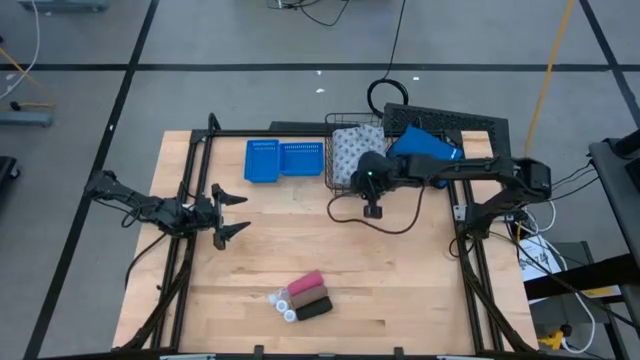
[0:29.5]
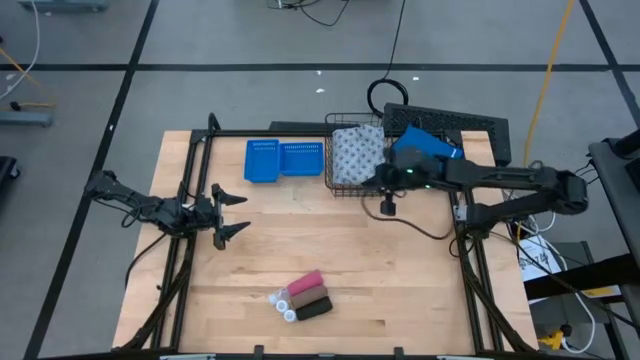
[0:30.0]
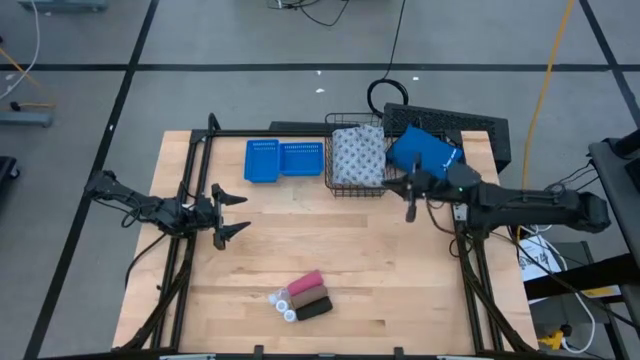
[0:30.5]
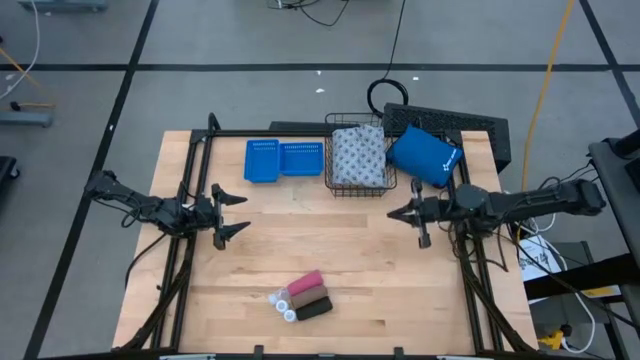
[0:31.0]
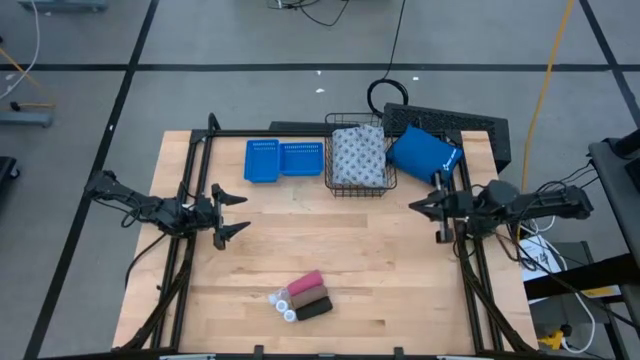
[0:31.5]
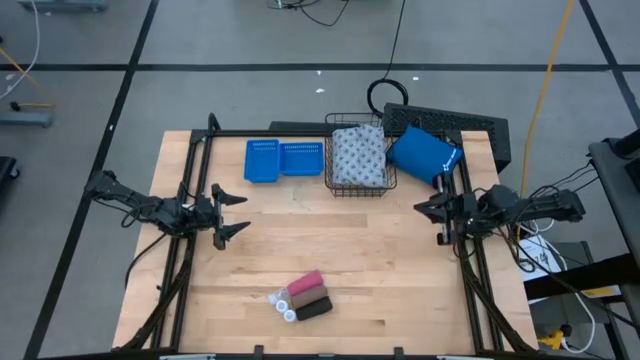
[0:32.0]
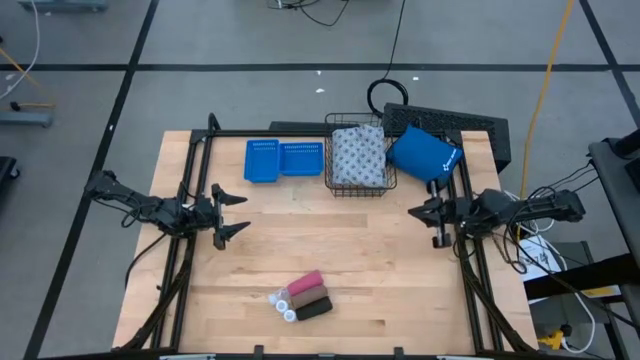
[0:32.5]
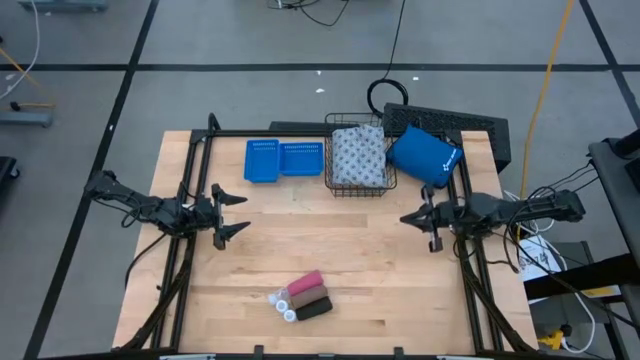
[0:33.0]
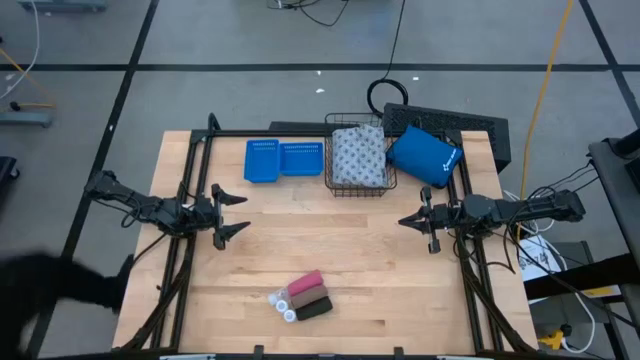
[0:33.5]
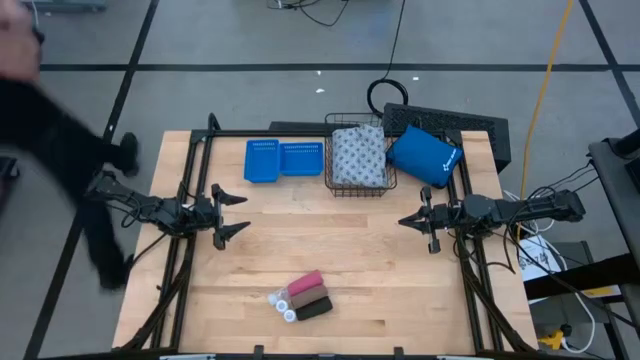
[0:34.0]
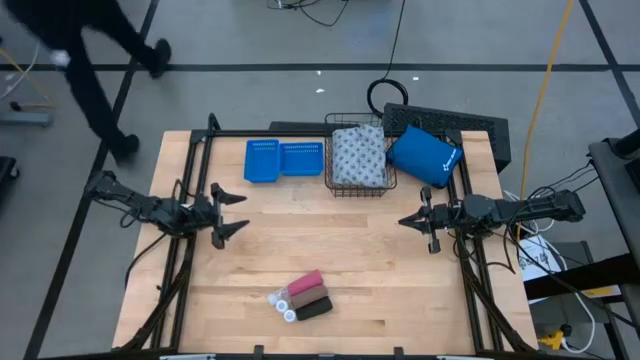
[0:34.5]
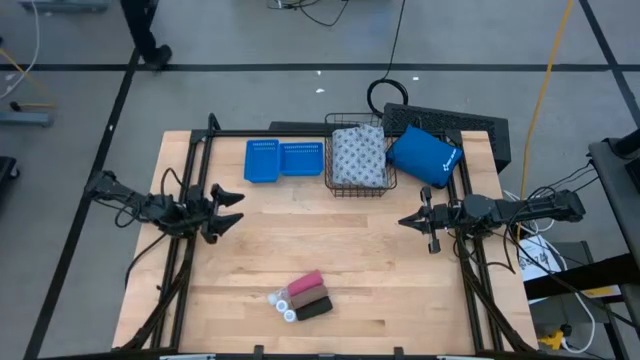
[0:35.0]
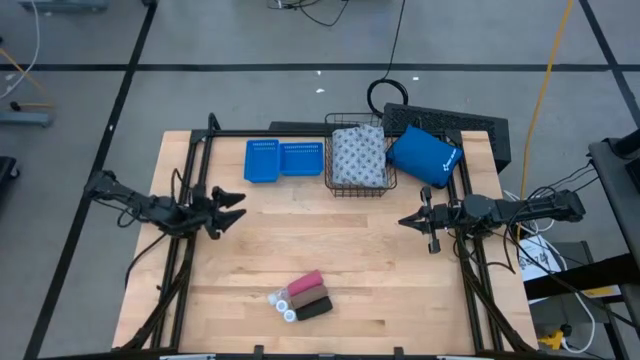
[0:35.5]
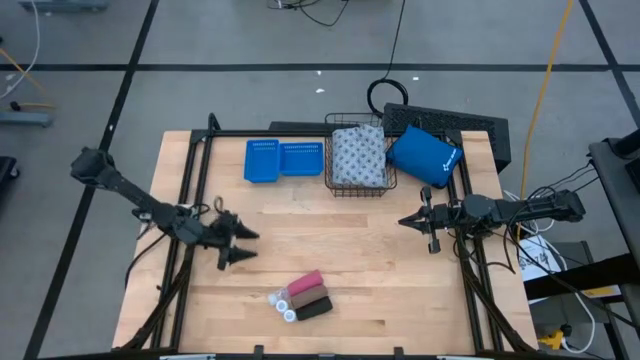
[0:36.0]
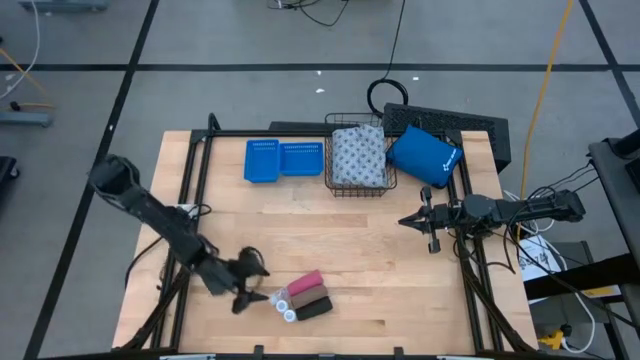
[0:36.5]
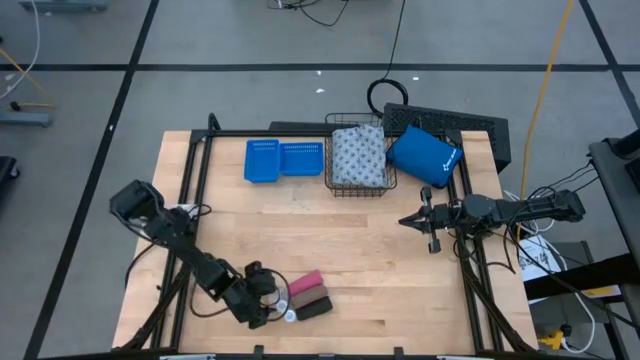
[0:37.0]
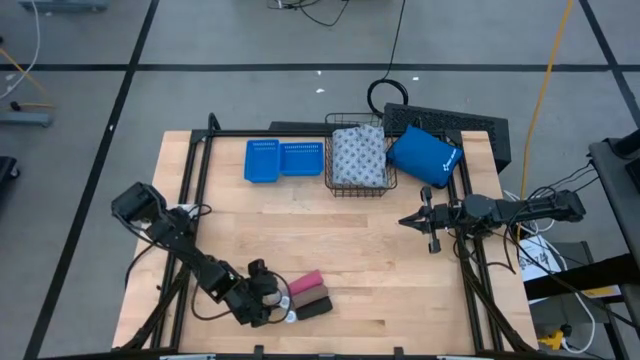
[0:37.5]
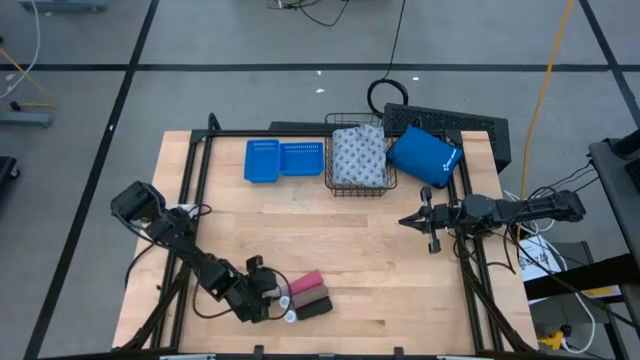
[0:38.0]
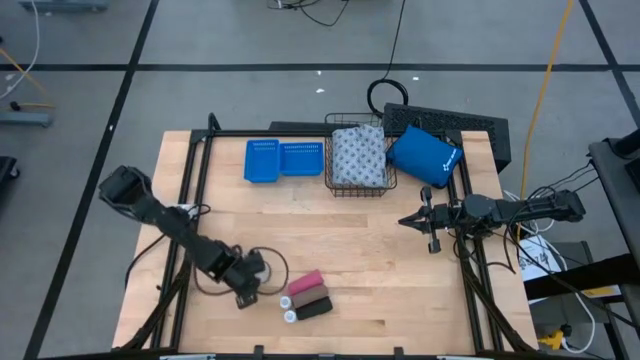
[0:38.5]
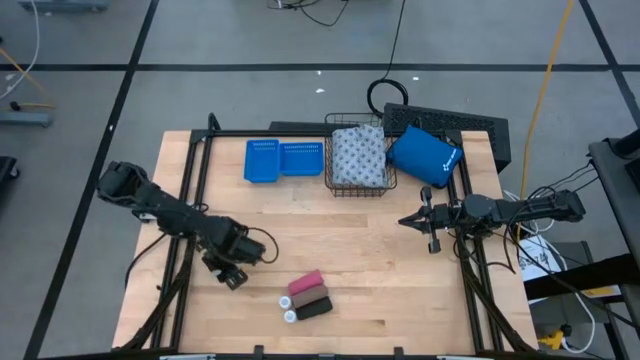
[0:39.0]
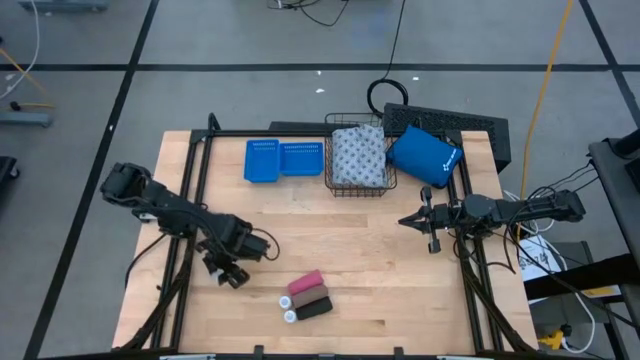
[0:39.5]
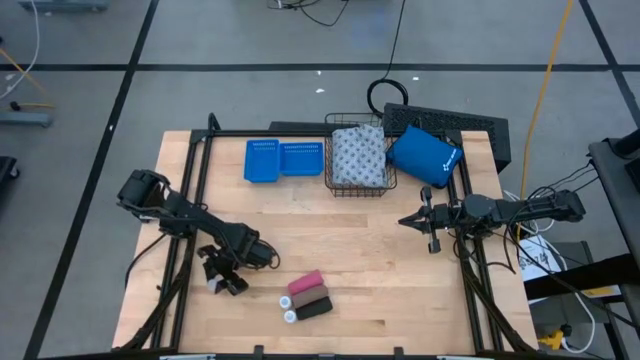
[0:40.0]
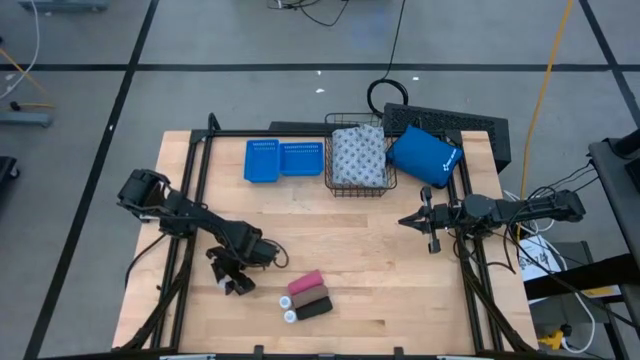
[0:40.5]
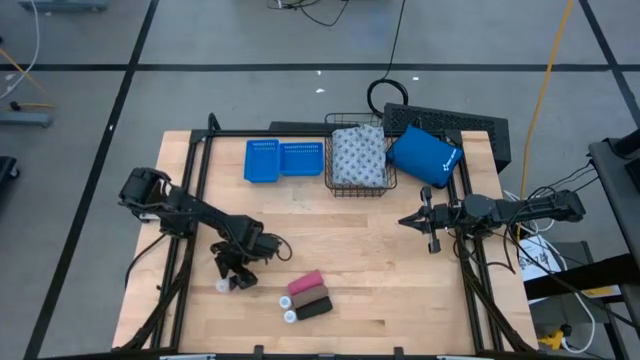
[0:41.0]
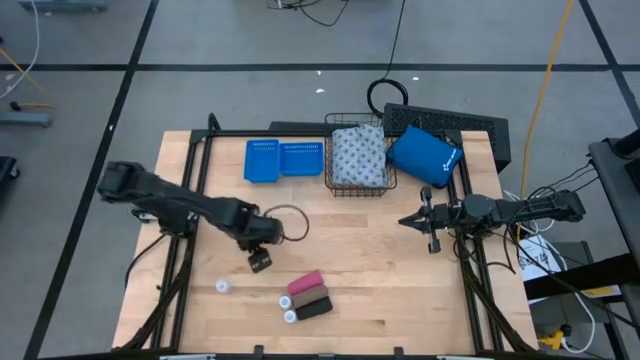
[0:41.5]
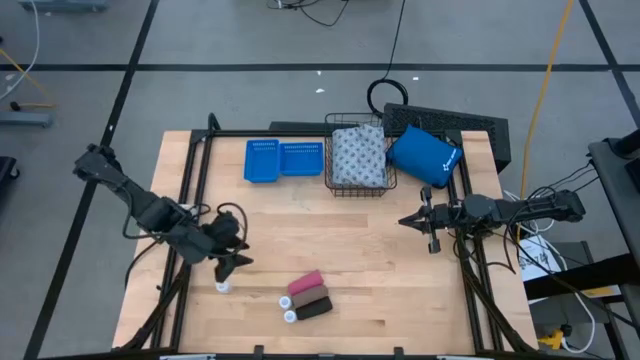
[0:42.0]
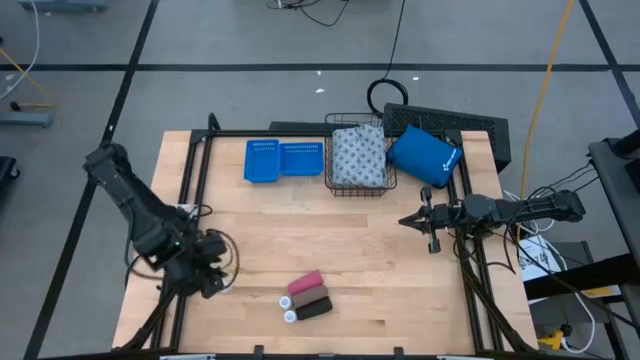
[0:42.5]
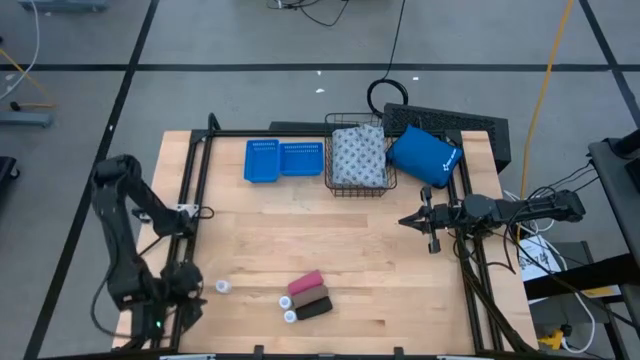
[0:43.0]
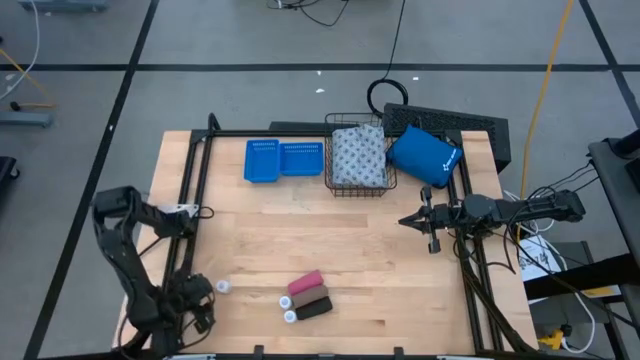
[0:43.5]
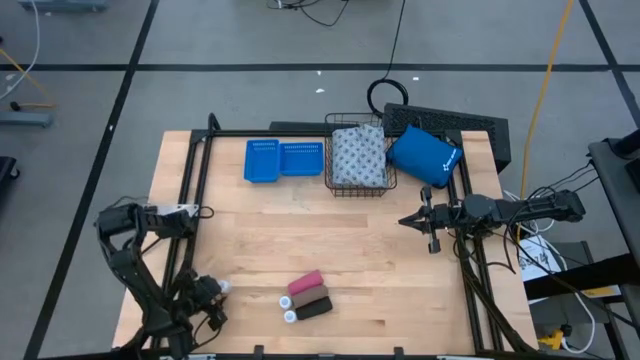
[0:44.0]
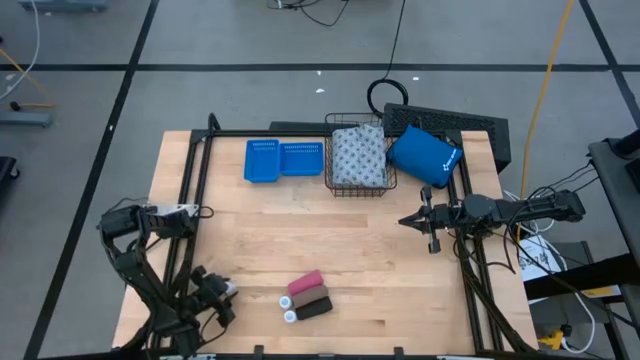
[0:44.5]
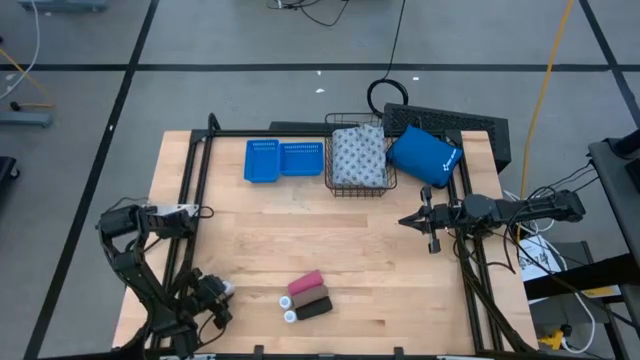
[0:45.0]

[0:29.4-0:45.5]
Task: Pick & Place Medicine items
Put the transparent pill bottle into the right blue bin
